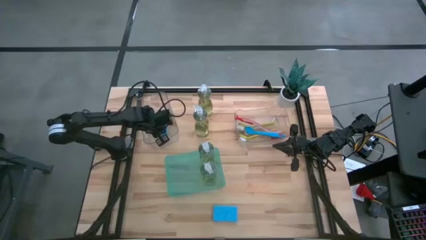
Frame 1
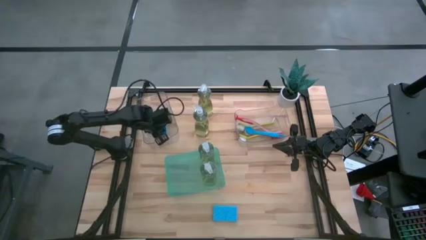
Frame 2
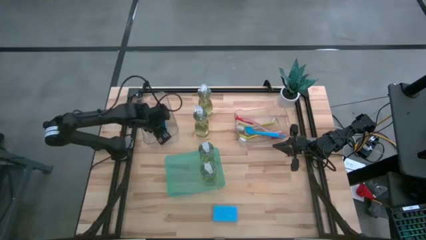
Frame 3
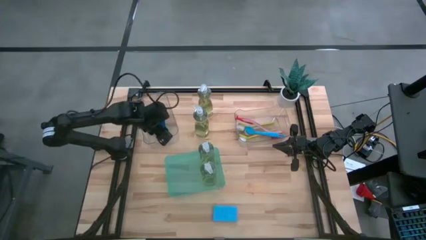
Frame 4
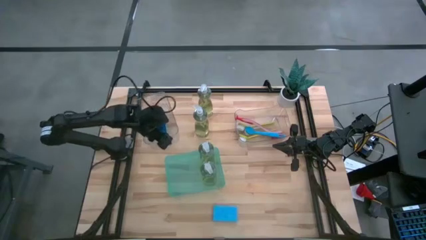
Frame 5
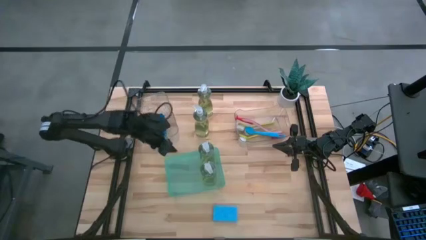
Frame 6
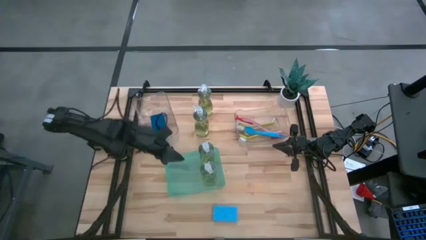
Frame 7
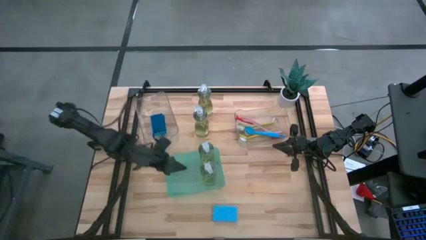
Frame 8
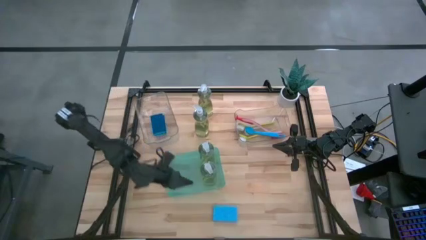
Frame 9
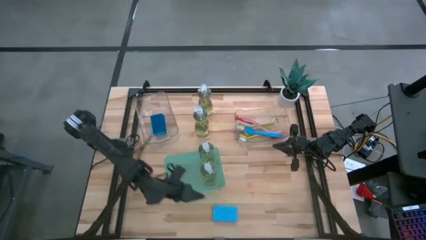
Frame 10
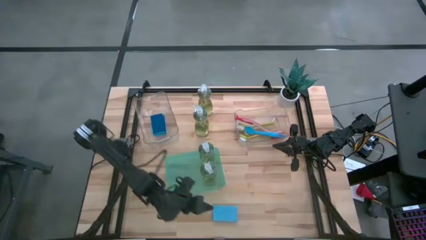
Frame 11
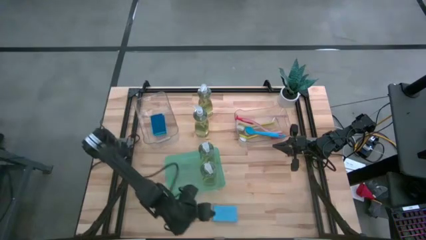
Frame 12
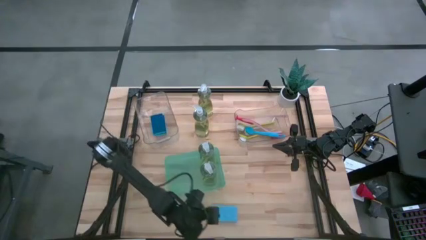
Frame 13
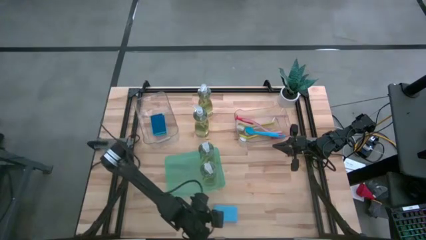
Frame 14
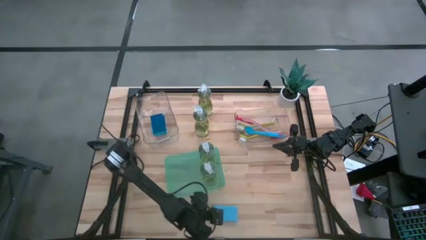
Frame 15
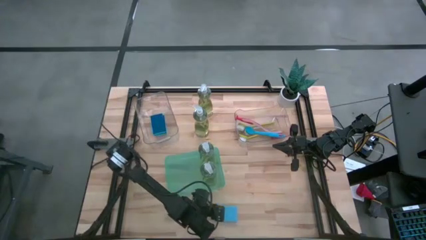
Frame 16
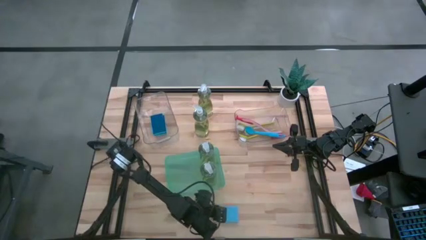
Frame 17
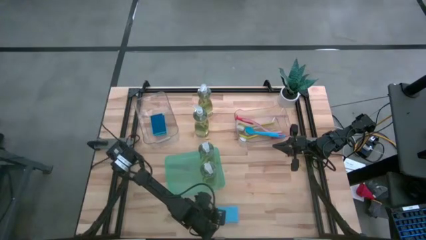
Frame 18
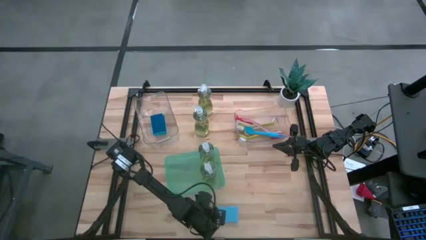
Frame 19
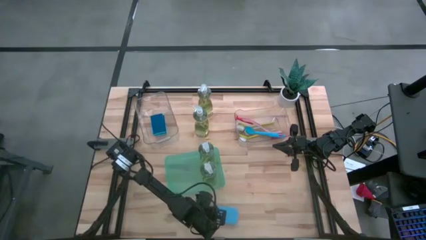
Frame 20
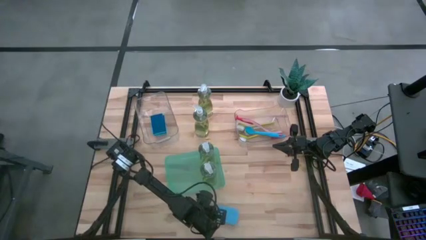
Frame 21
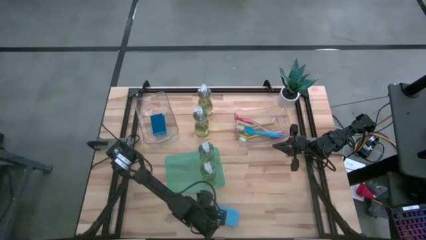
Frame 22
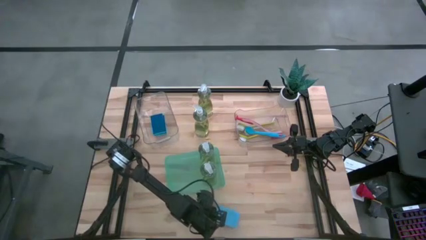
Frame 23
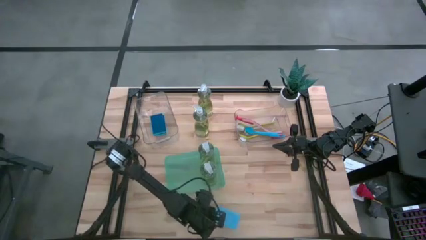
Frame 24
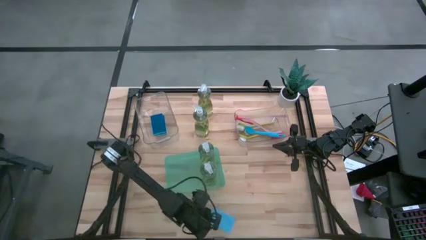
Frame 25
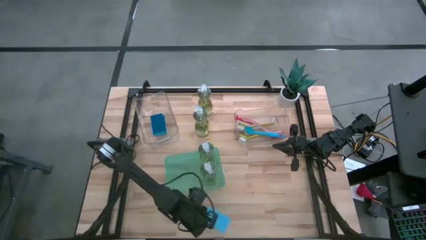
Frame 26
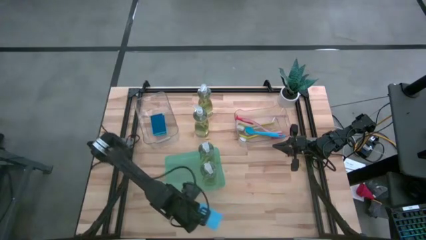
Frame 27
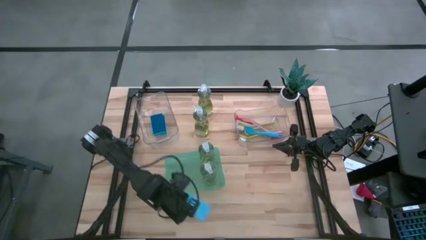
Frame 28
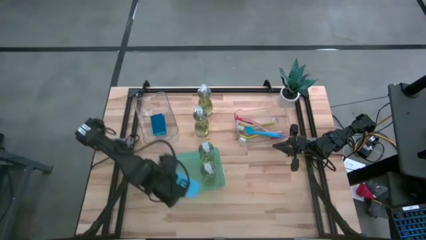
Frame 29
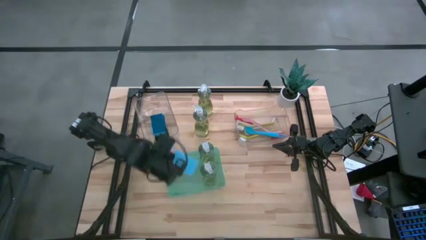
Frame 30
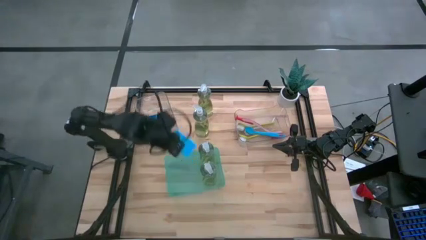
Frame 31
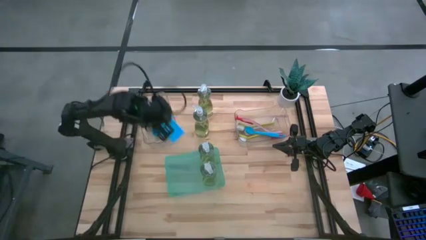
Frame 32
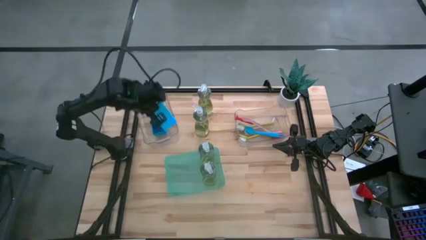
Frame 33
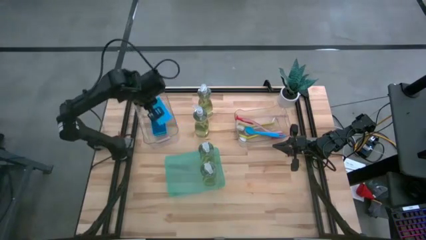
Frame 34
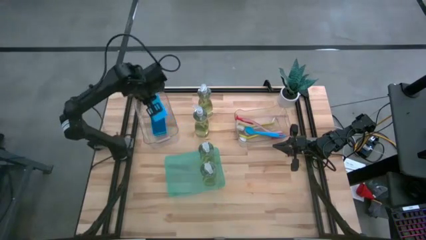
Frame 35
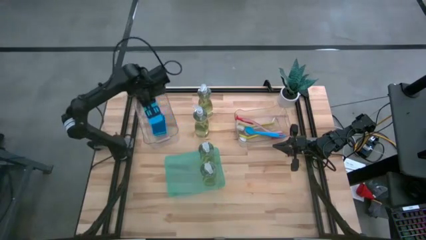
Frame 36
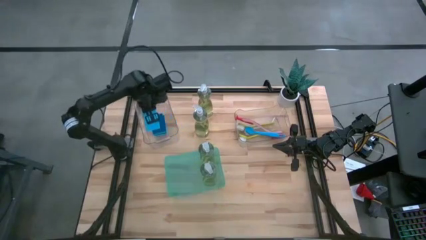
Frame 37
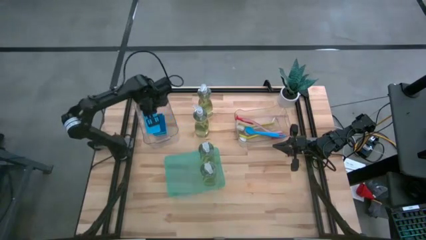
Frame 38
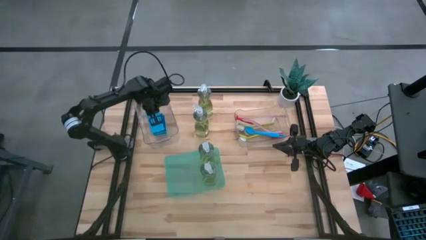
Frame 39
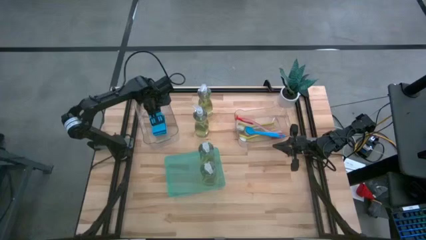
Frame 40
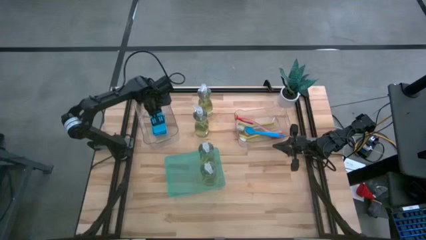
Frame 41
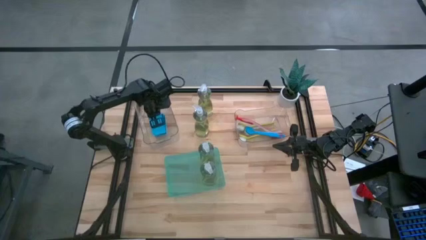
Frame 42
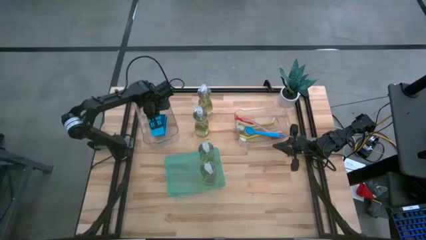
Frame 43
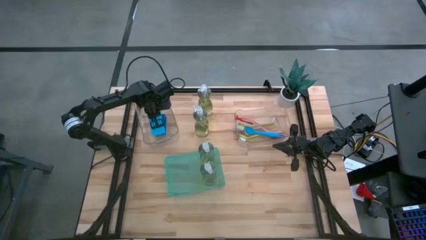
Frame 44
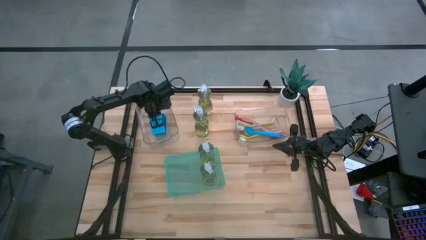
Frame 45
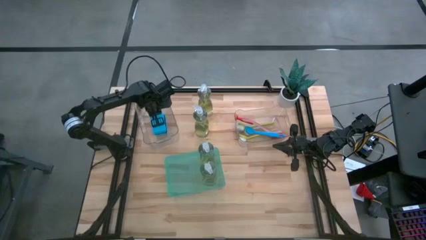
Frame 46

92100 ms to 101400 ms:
Task: Pick & Place Kitchen Sink Supplies
Put the blue sponge into the left transparent bin

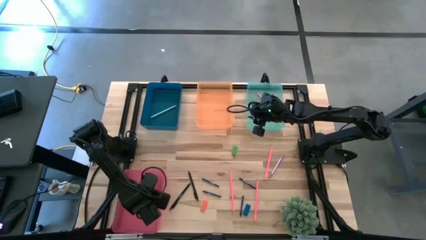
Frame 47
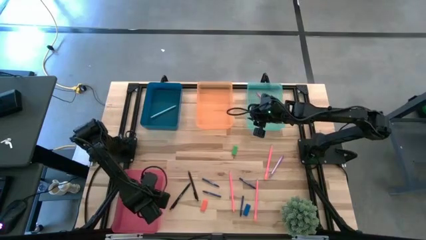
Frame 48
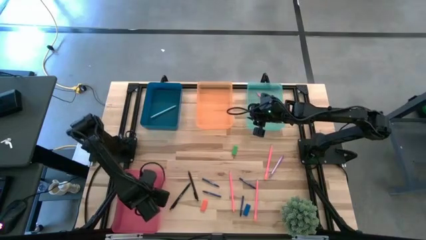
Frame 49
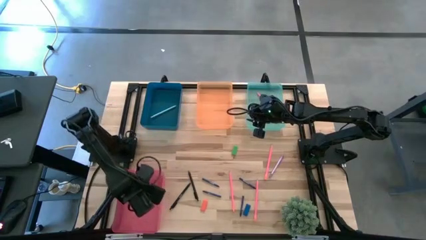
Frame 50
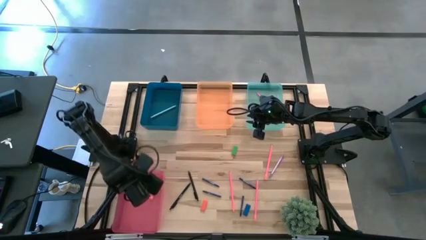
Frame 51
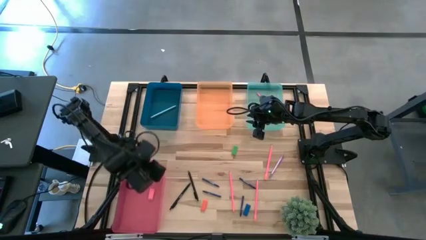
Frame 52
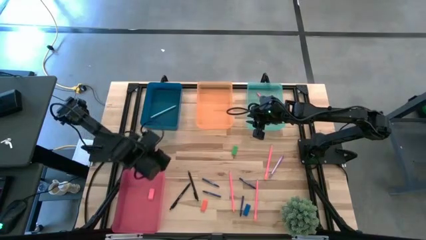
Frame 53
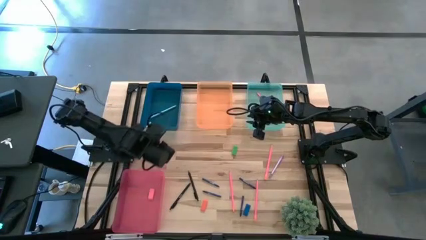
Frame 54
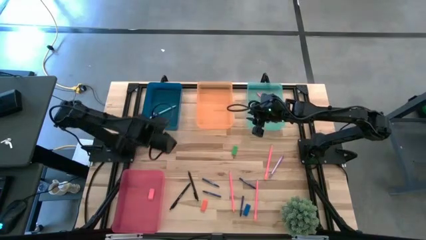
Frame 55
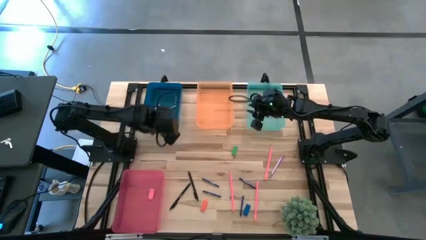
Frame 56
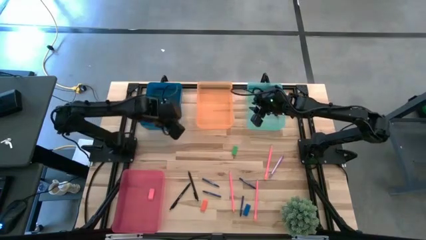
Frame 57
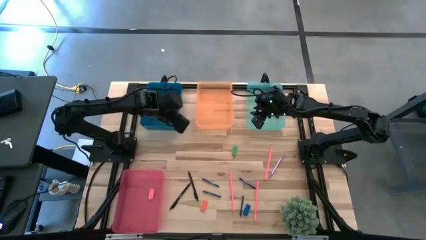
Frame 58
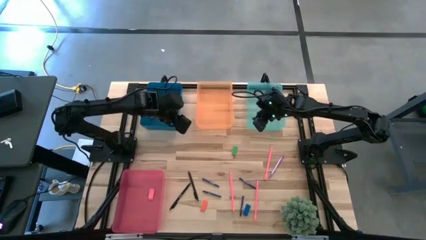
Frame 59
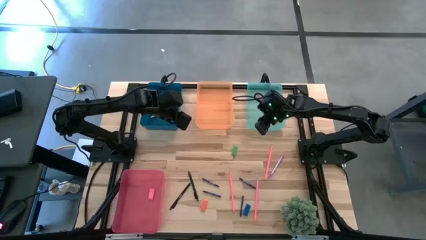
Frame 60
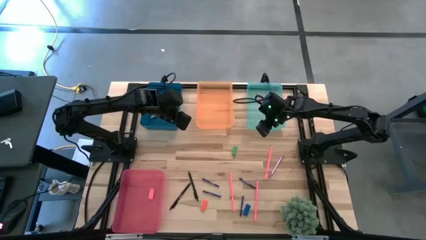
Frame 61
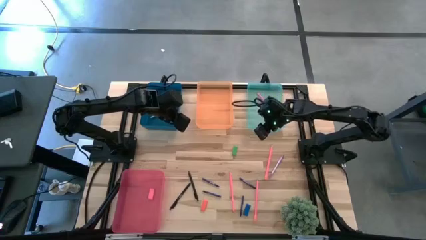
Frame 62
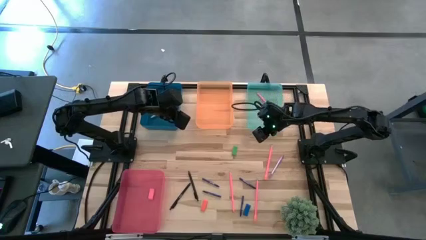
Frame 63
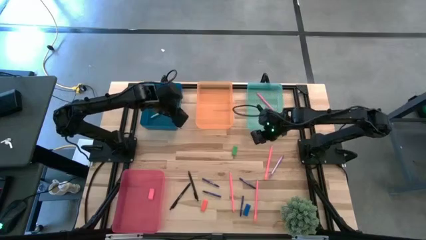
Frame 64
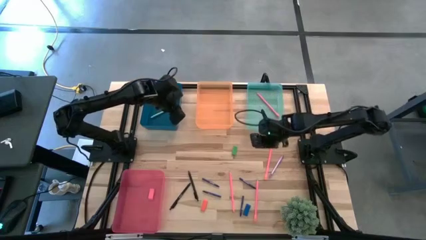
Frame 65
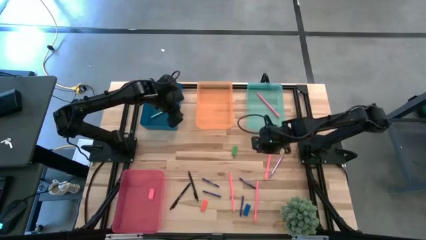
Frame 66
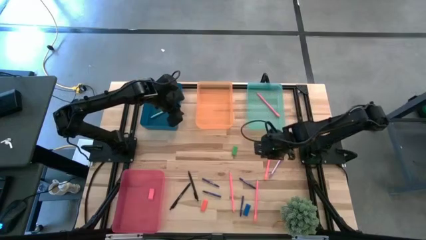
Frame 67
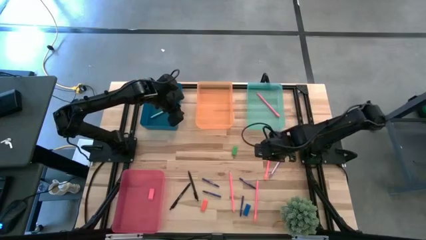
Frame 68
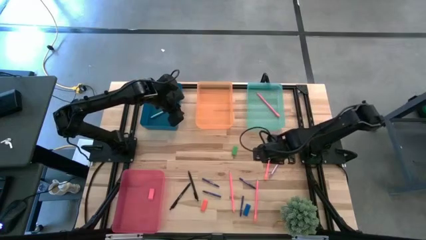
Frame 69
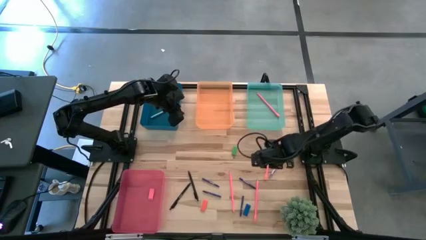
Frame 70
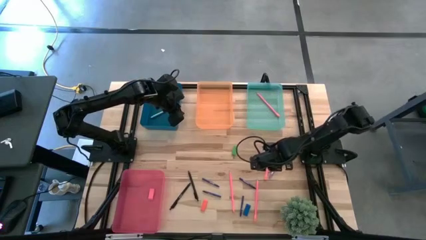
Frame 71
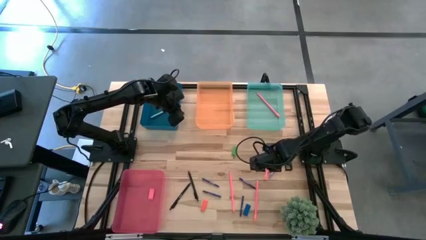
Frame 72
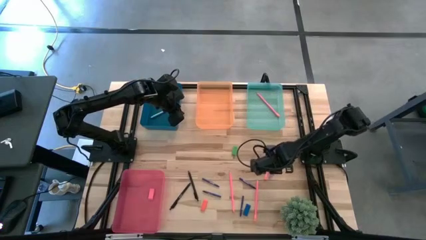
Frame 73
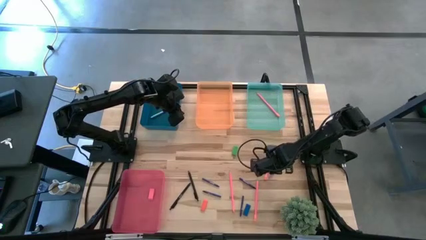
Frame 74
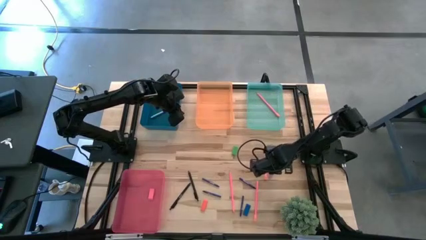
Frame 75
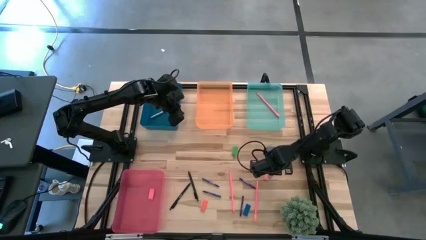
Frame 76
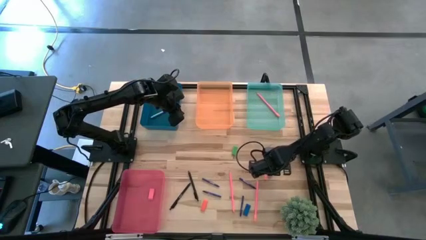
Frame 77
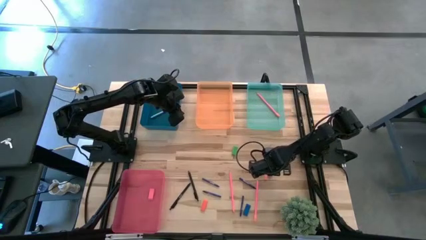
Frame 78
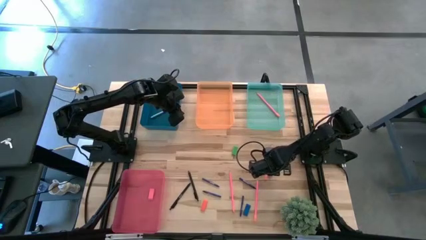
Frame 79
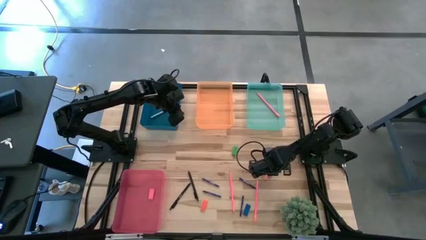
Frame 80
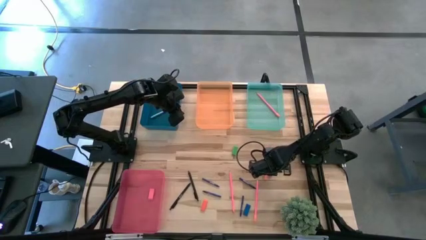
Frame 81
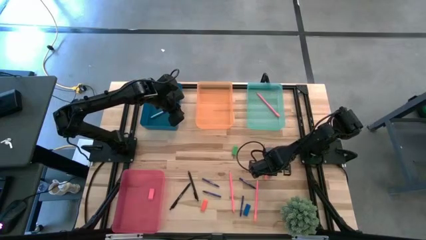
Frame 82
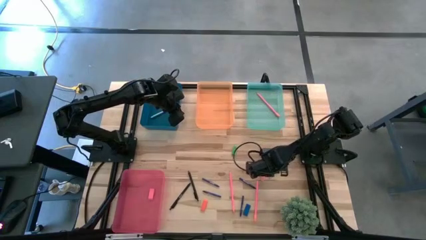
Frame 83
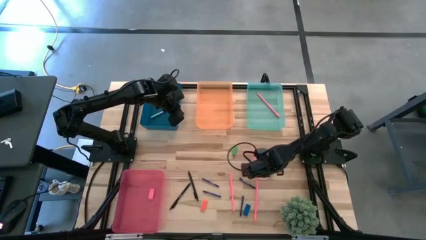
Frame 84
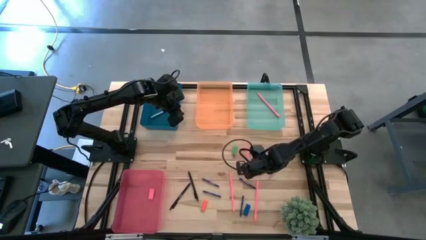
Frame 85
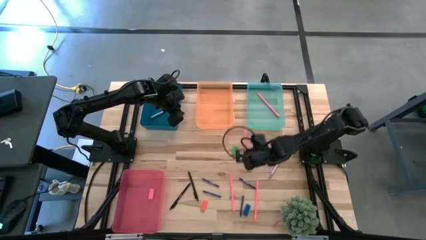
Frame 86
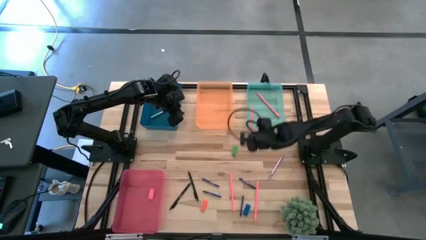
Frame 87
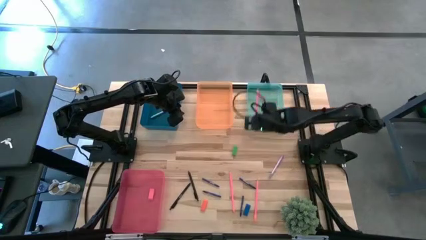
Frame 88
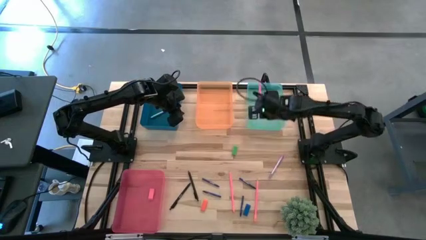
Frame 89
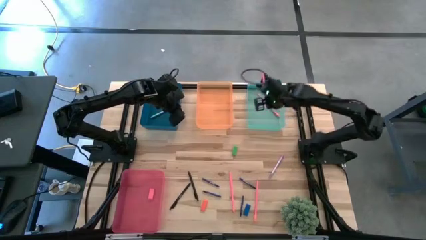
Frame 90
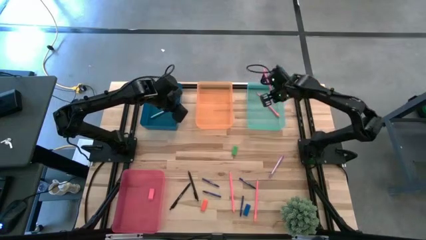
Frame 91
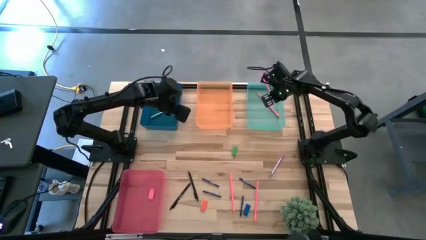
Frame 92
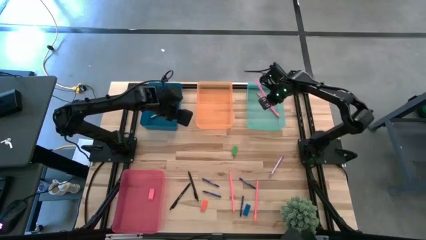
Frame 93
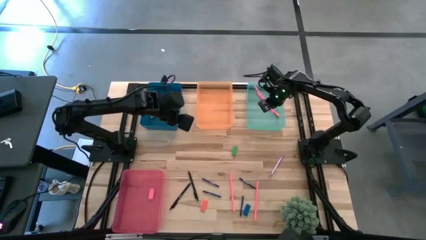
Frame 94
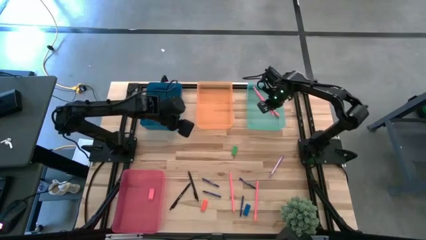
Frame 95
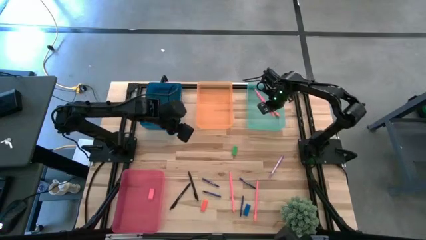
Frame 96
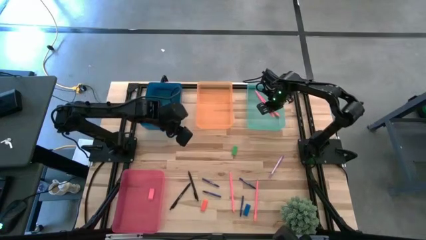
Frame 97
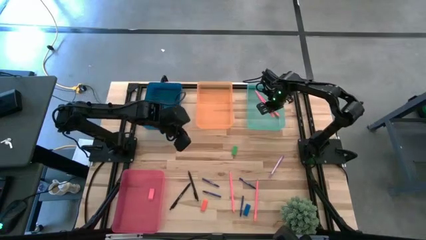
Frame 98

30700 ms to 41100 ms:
Task: Sort crayons/erasers/pens/pencils in bins
Put the pink pencil into the light blue bin
